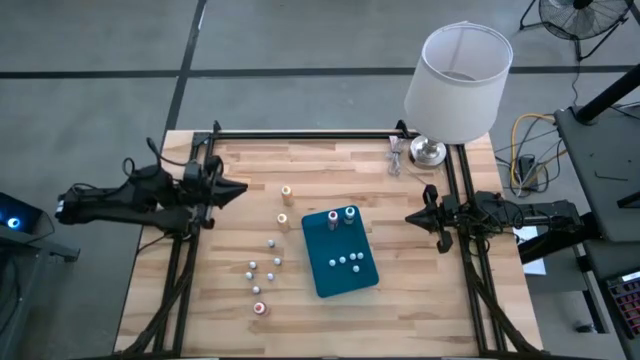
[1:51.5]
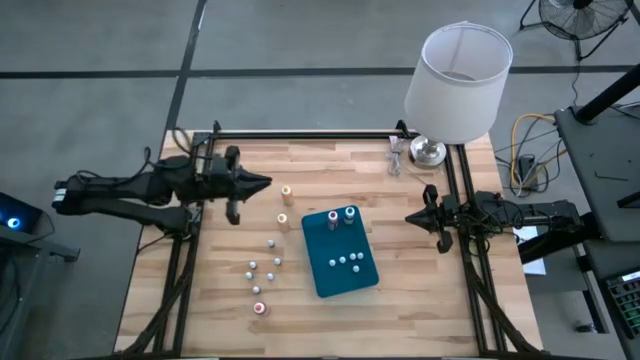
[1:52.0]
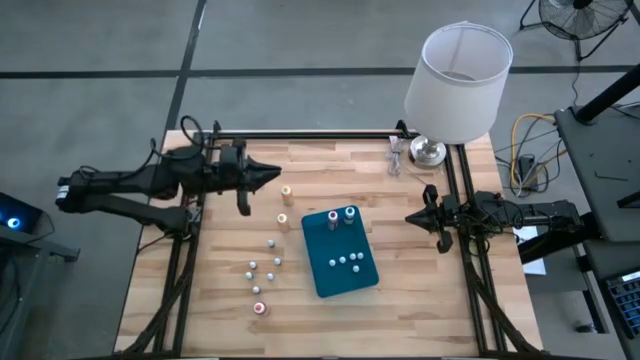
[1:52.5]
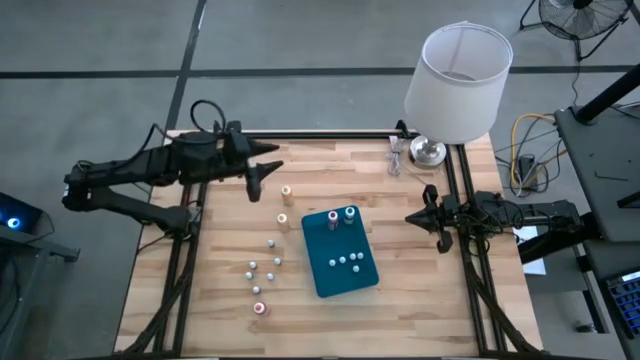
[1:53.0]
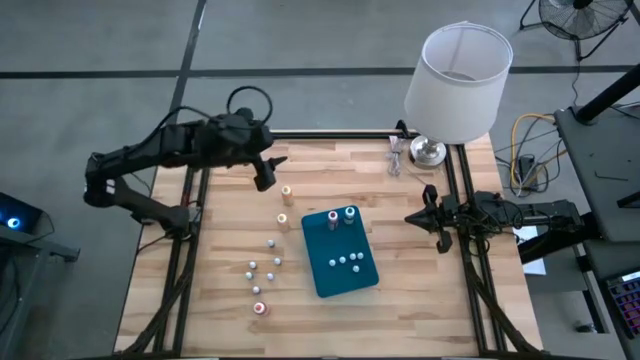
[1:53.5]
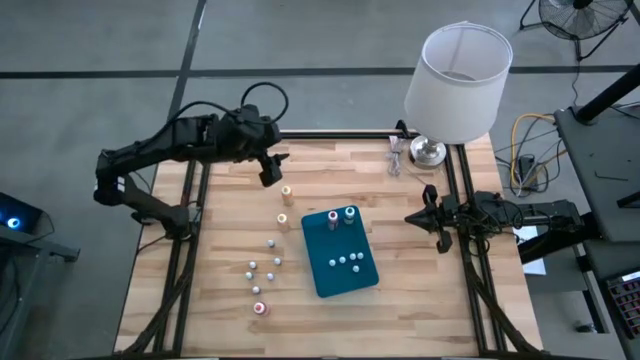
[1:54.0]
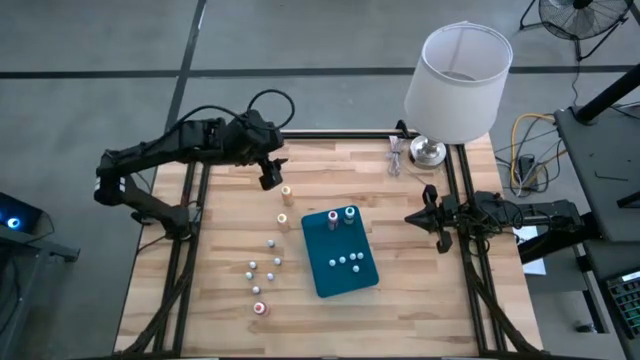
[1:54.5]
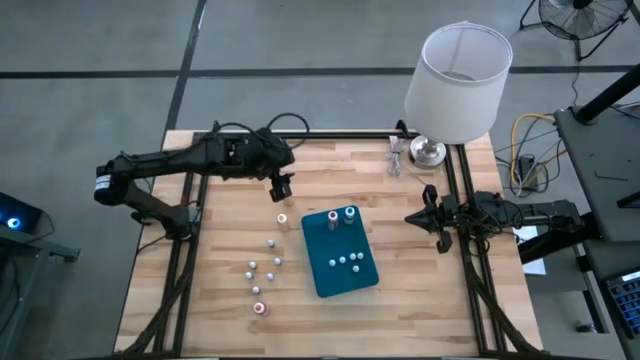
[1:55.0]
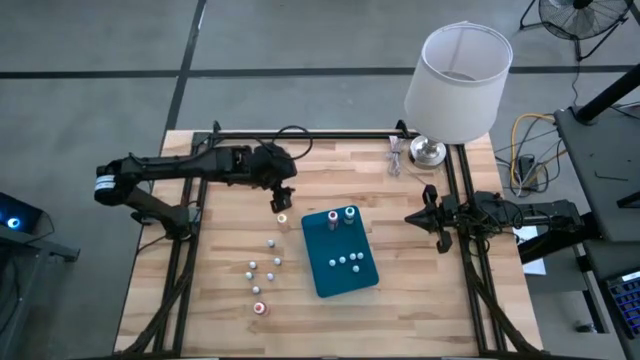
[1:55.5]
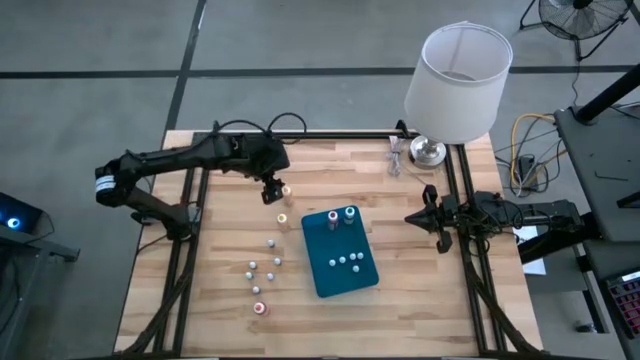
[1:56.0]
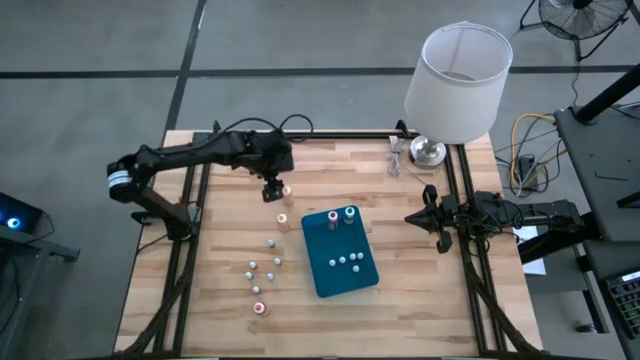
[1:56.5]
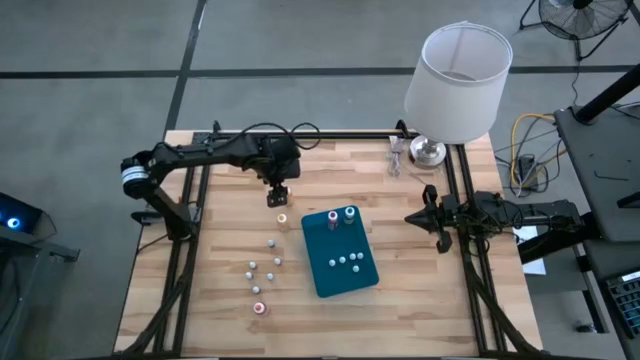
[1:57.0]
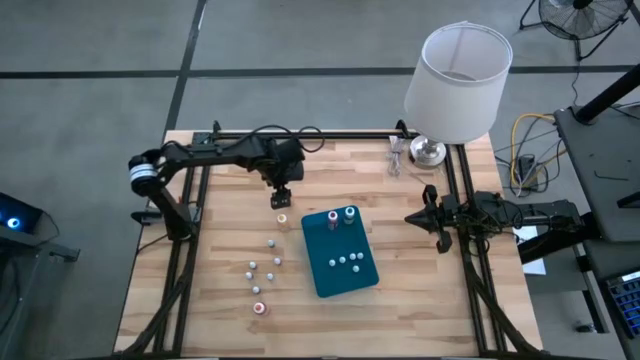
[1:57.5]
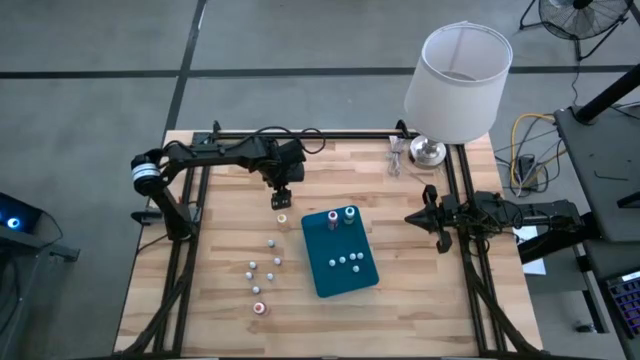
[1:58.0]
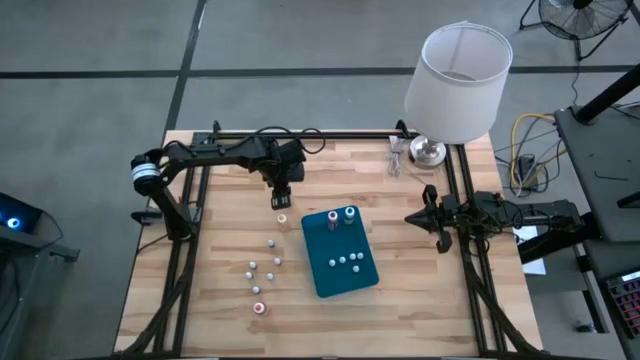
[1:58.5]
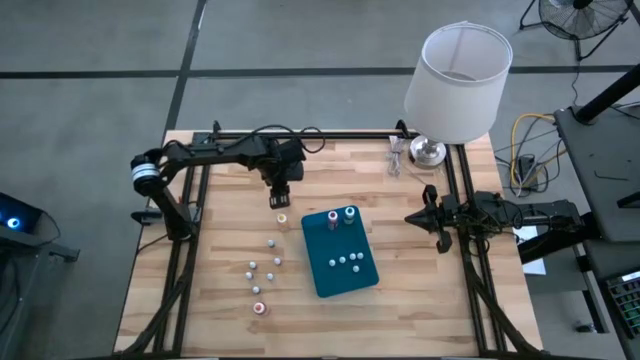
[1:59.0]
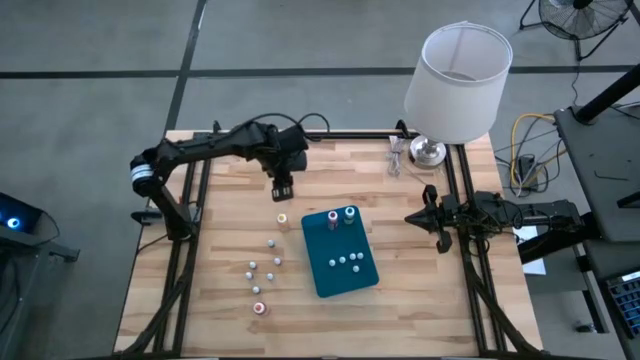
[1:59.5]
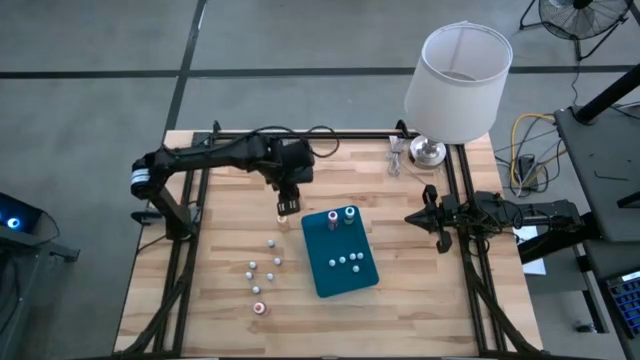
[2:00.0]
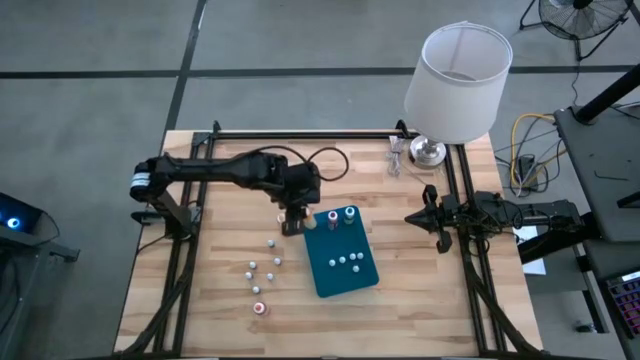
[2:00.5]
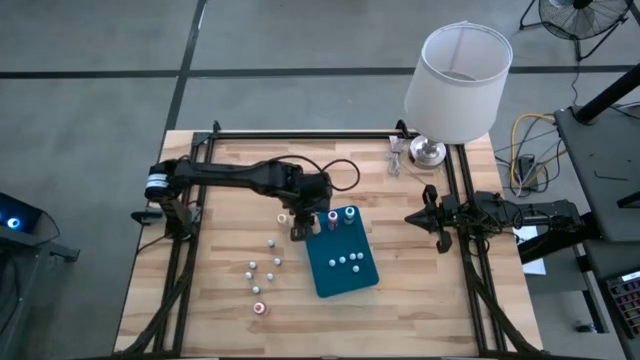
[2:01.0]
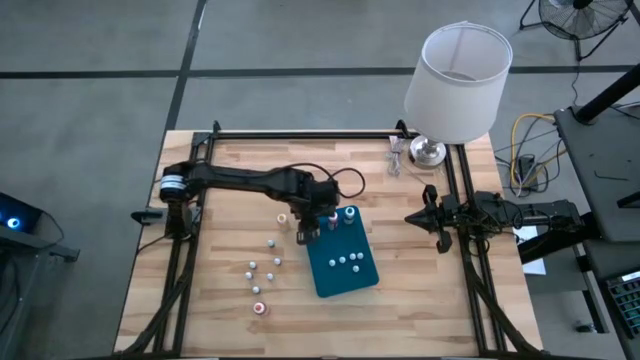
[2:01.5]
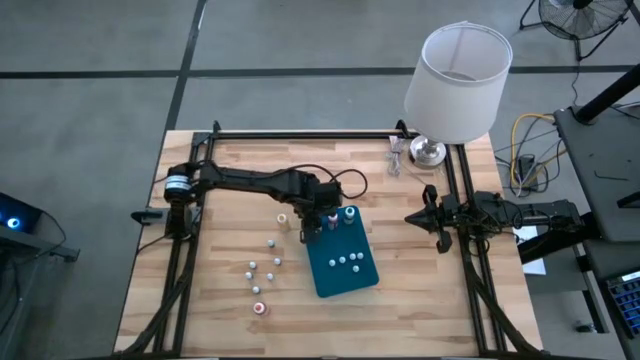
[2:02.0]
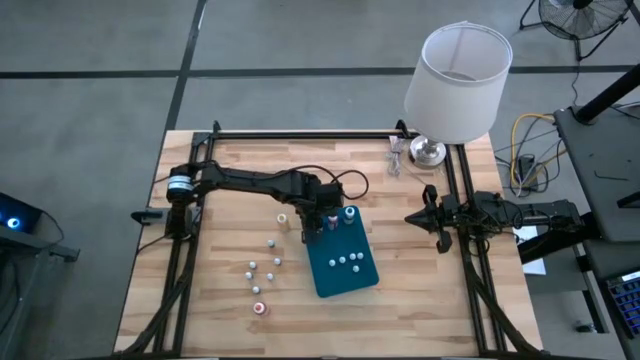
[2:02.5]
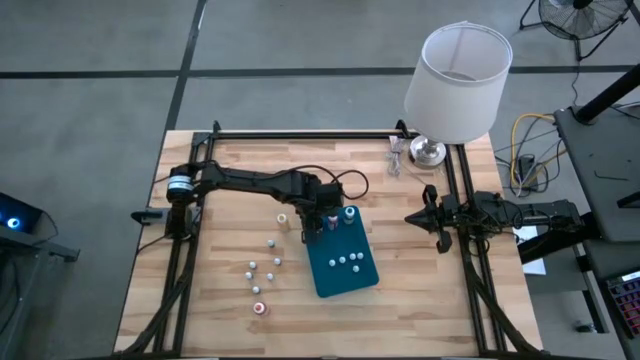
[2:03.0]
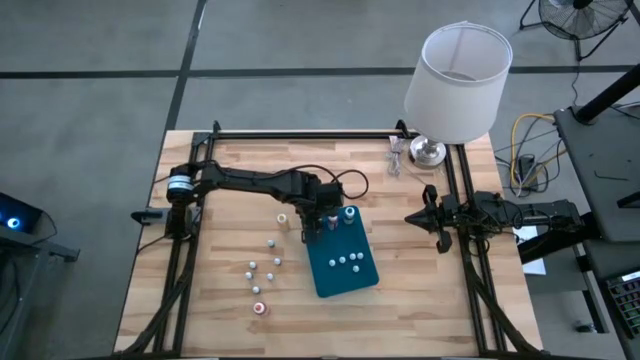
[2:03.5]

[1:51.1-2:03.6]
Task: Pick & Place food coloring
Put the top large yellow food coloring bottle into the blue bin

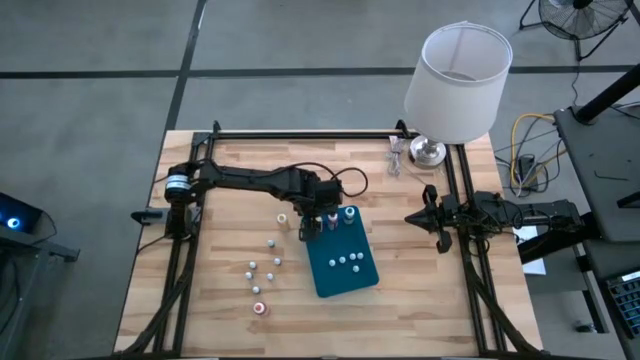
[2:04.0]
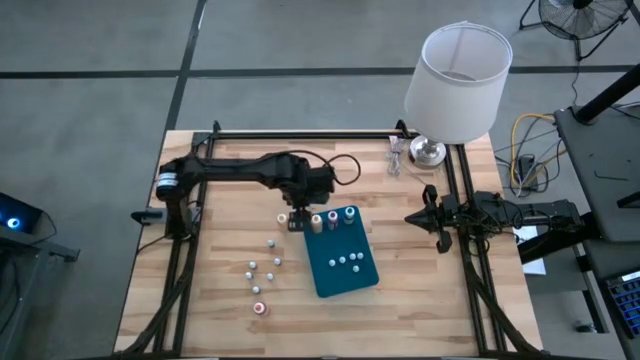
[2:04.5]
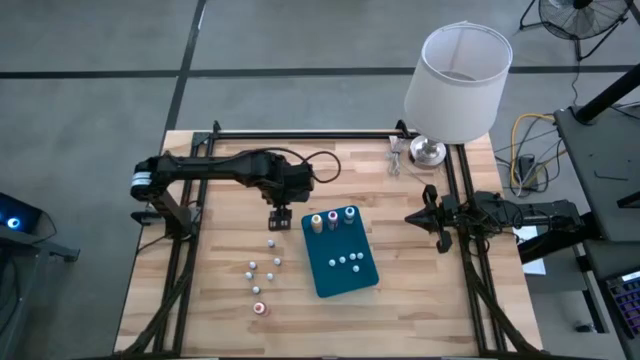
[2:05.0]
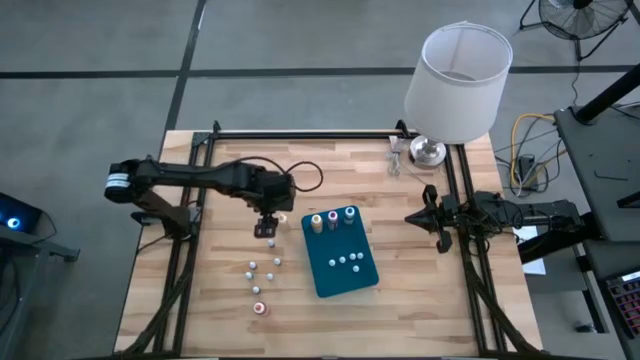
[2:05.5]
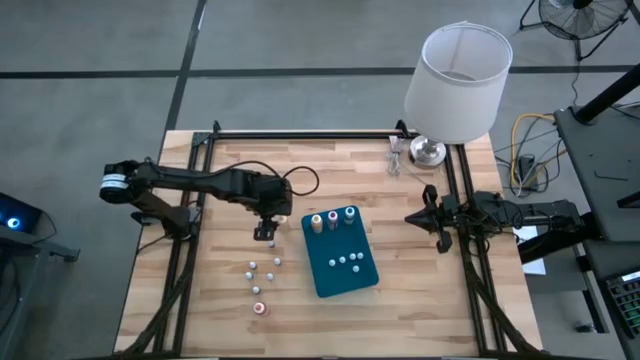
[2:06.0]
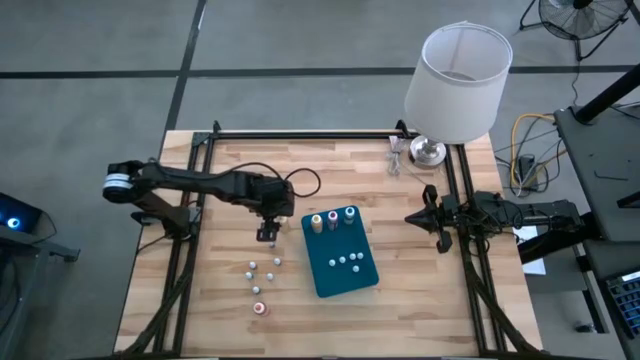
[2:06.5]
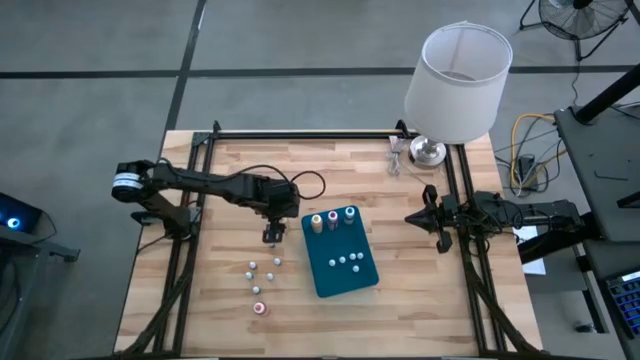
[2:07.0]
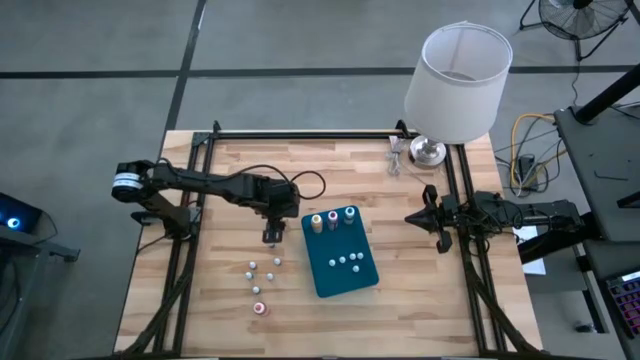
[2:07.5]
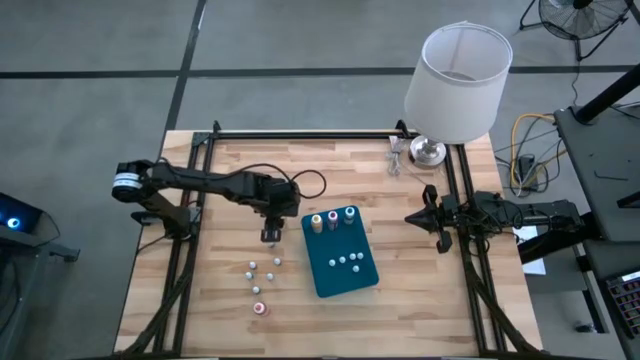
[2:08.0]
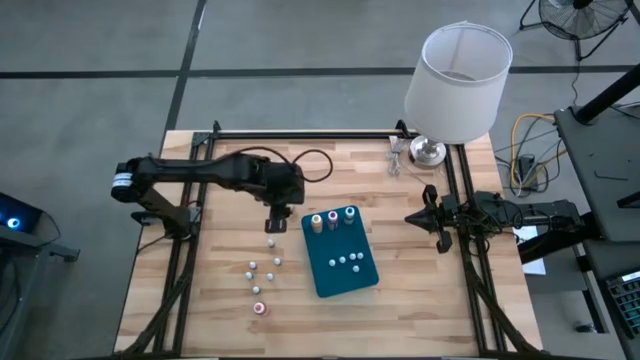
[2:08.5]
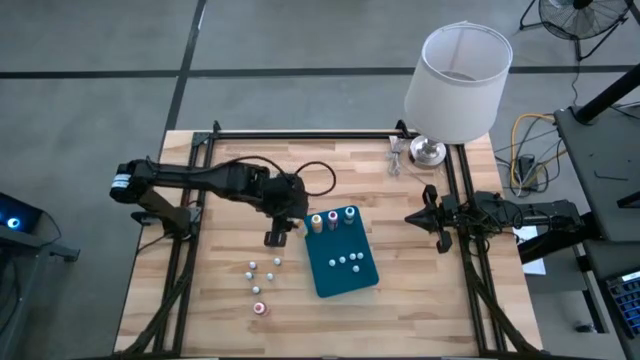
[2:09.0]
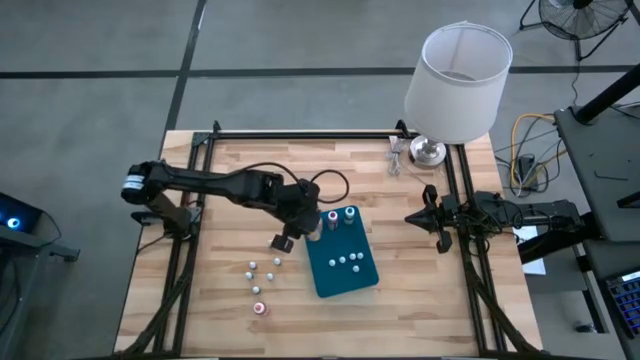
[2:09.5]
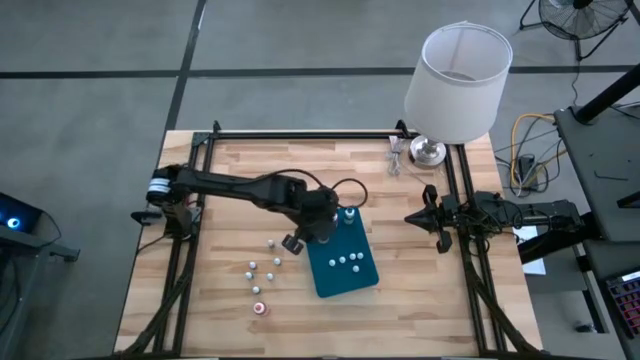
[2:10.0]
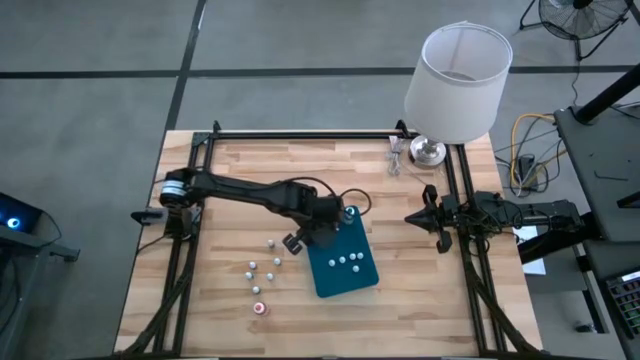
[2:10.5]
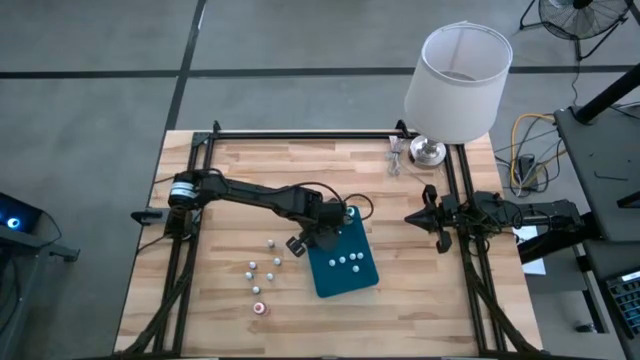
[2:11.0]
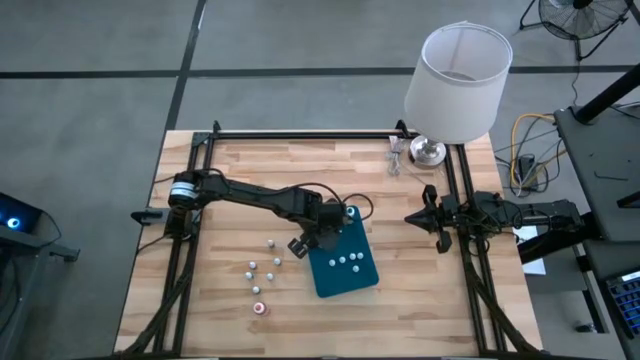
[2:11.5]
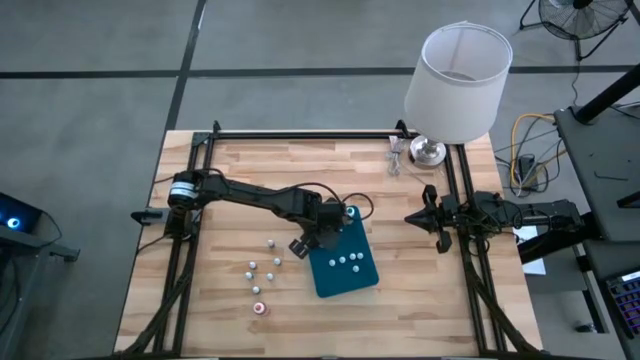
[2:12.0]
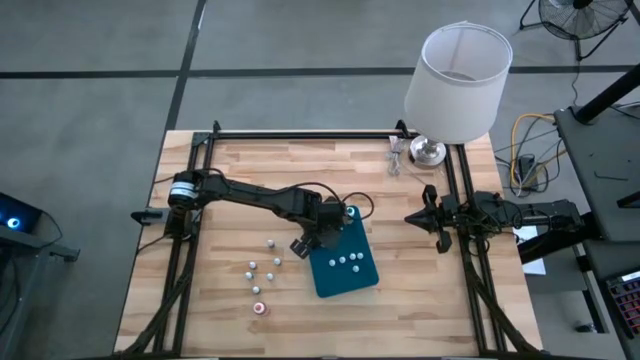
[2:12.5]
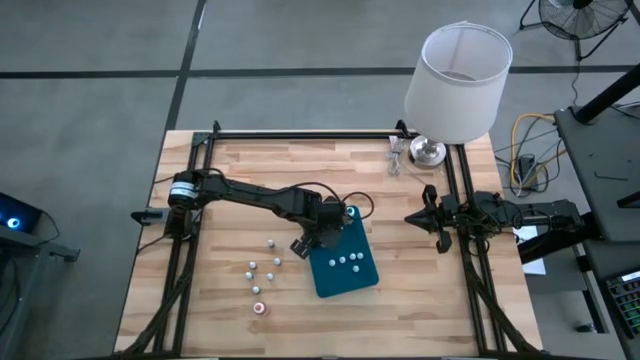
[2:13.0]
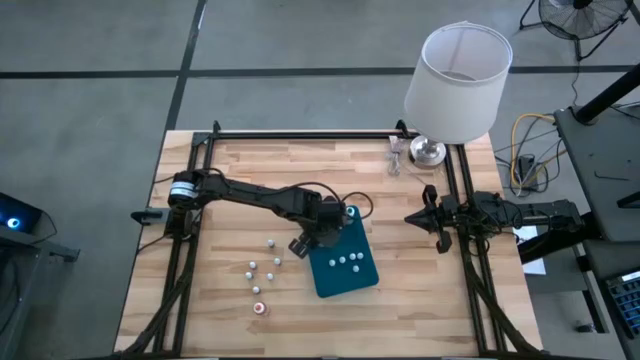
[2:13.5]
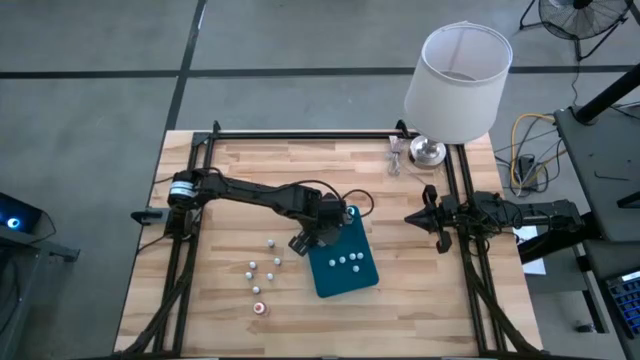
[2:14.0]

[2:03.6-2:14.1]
Put the large yellow food coloring bottle into the blue bin
